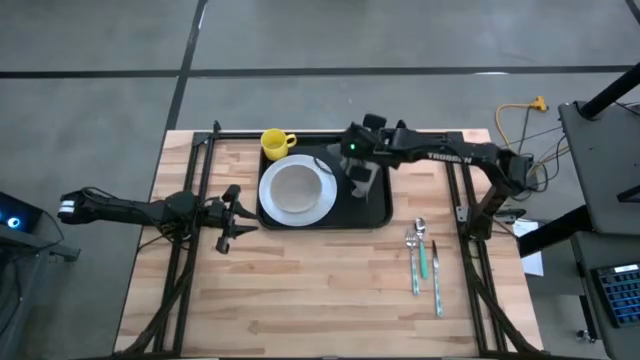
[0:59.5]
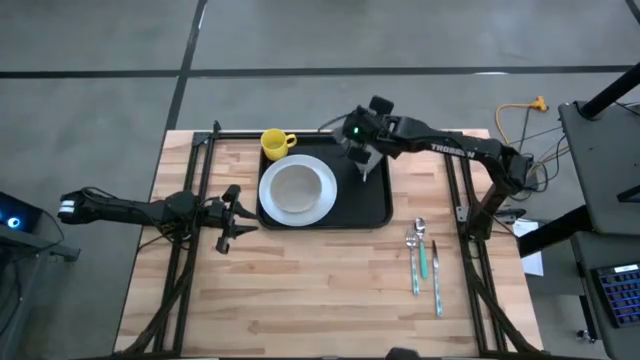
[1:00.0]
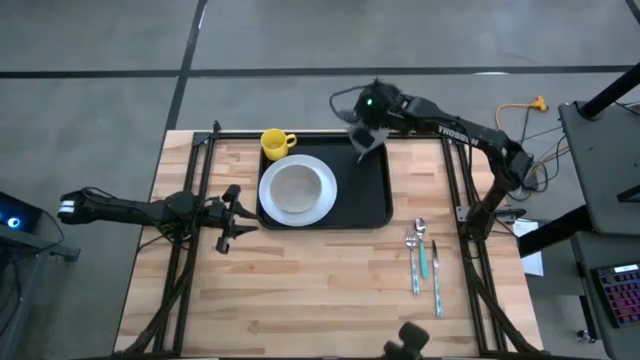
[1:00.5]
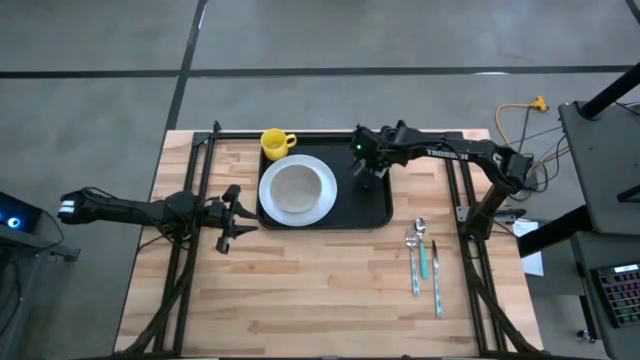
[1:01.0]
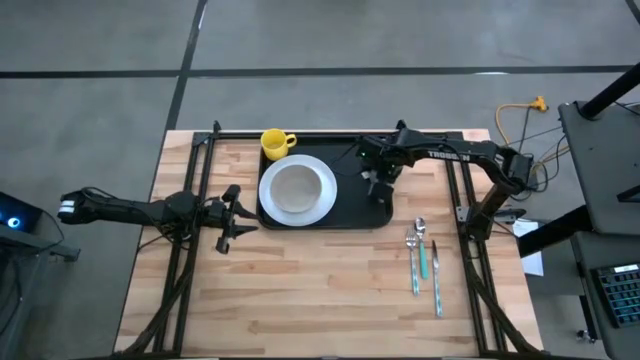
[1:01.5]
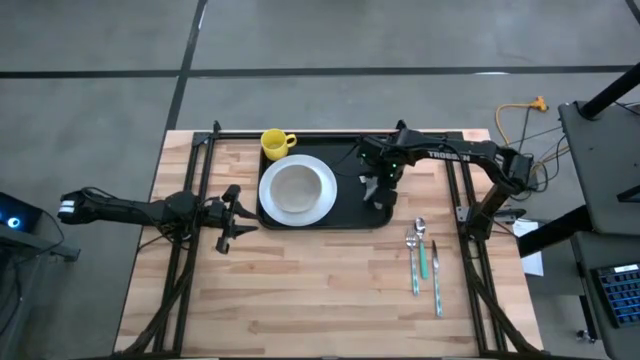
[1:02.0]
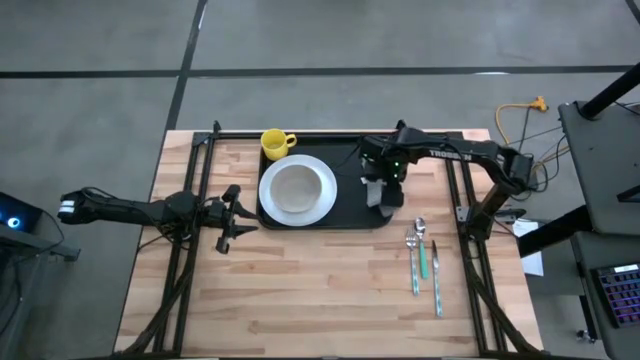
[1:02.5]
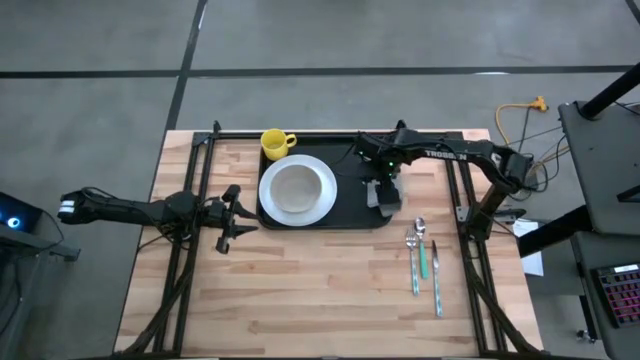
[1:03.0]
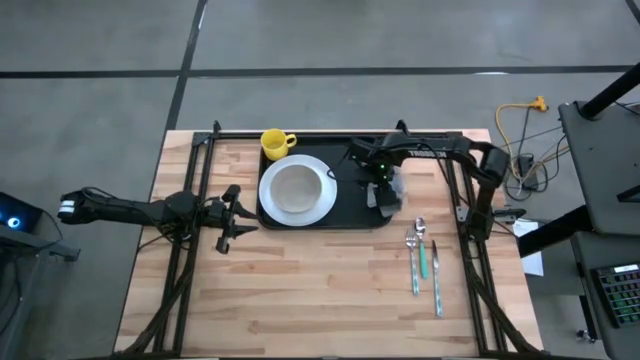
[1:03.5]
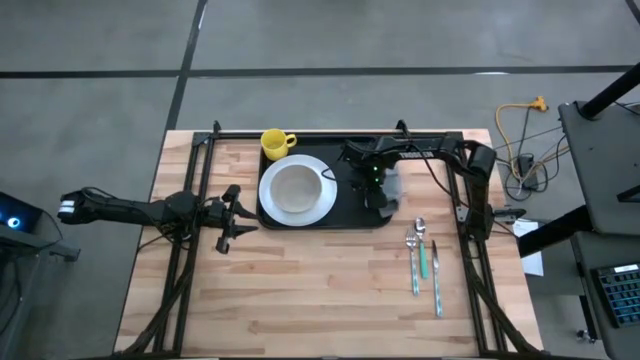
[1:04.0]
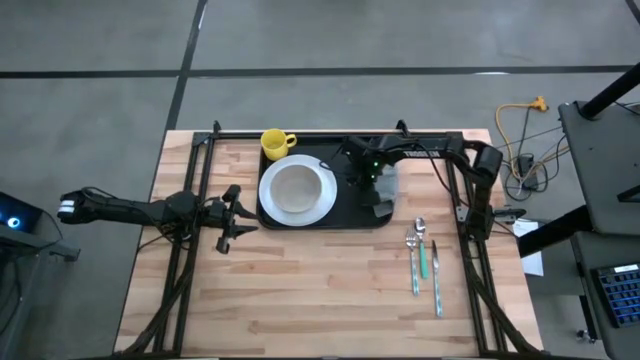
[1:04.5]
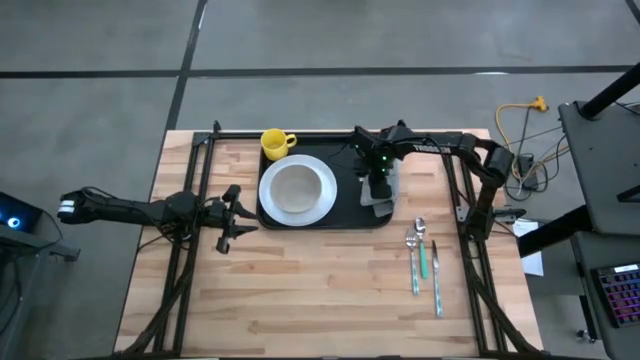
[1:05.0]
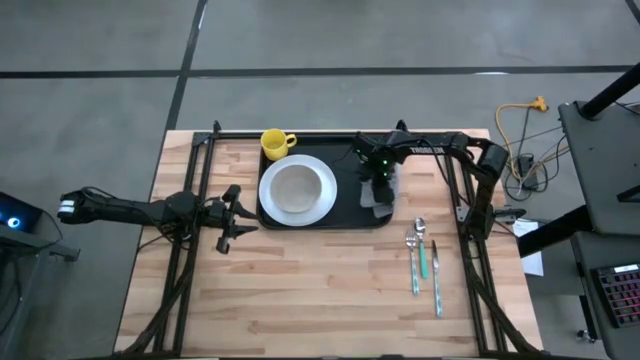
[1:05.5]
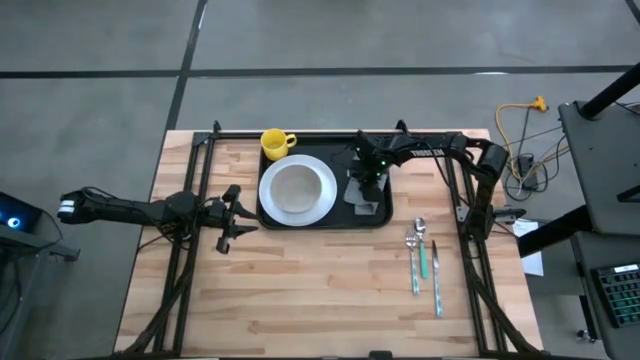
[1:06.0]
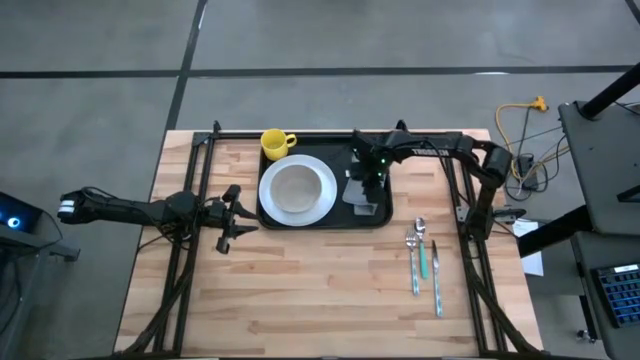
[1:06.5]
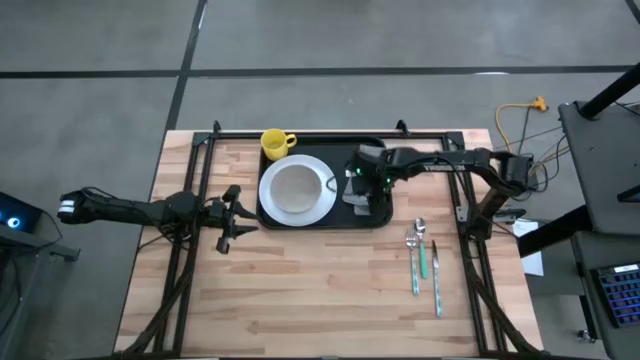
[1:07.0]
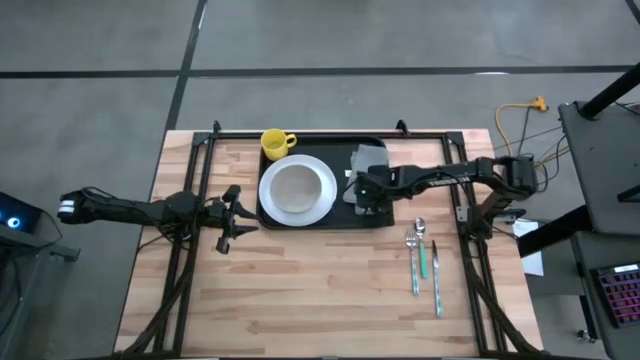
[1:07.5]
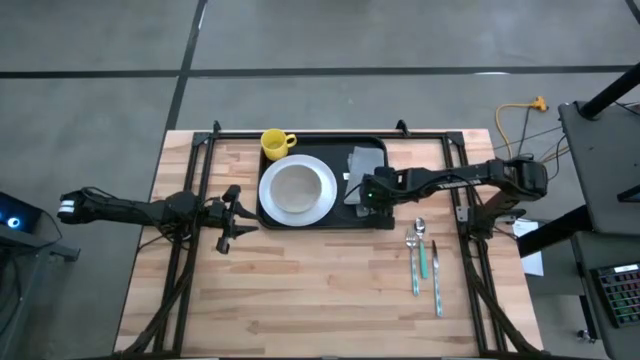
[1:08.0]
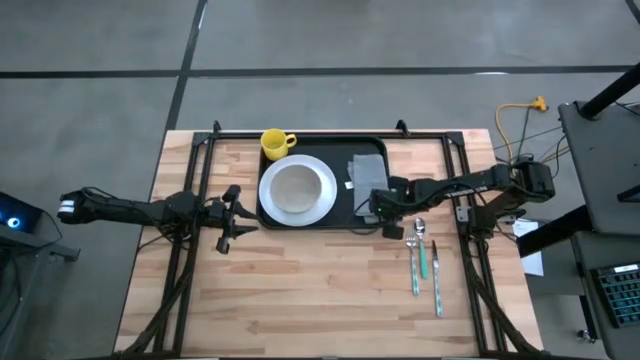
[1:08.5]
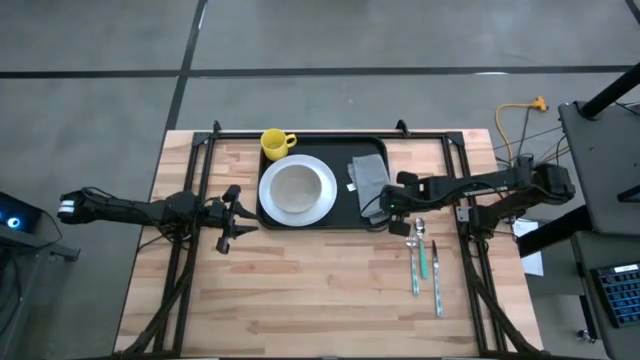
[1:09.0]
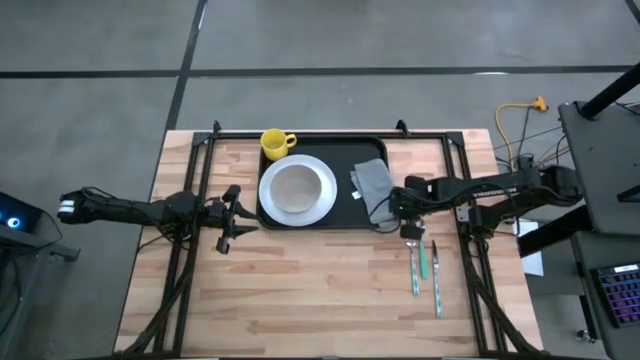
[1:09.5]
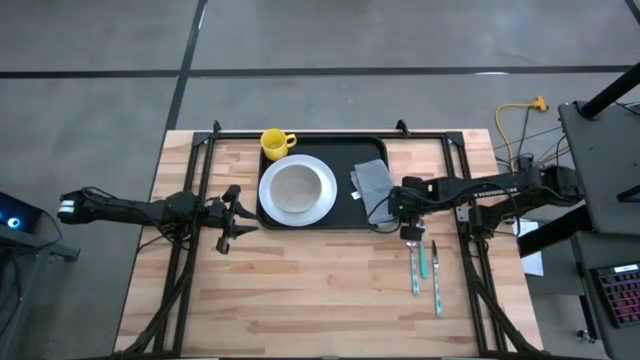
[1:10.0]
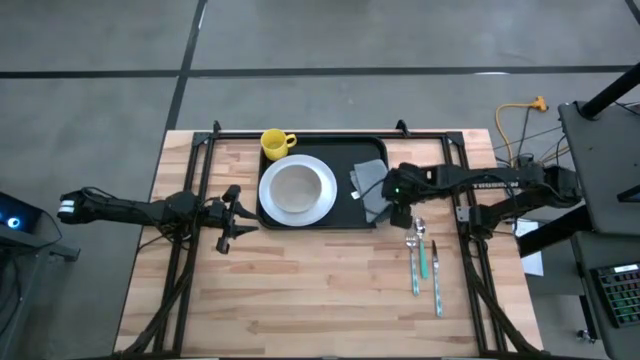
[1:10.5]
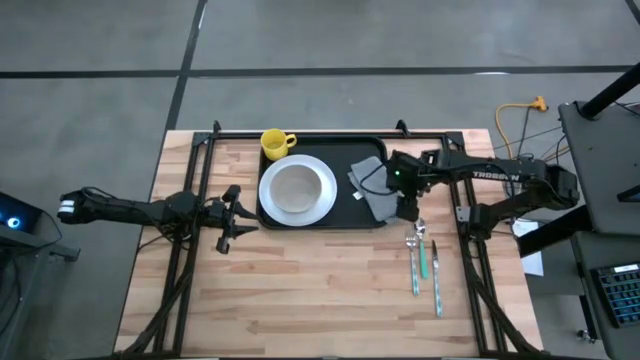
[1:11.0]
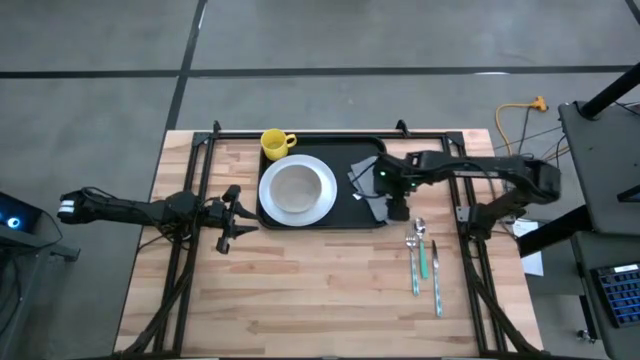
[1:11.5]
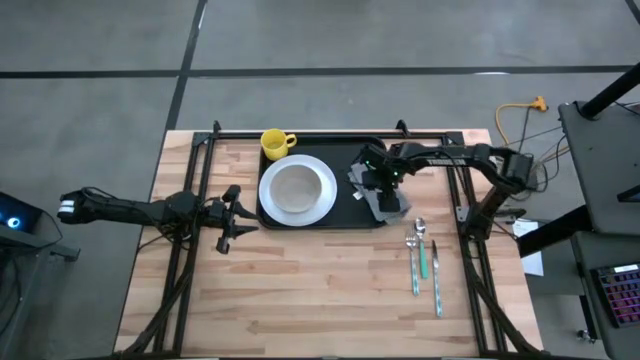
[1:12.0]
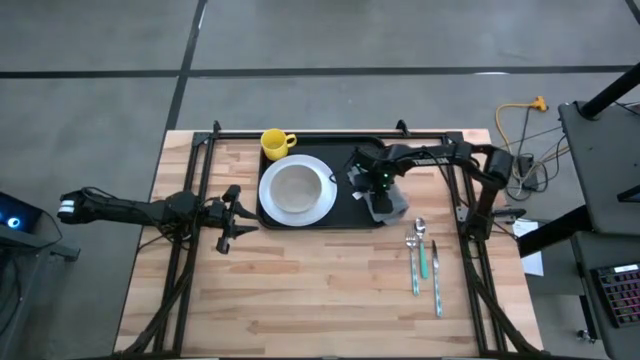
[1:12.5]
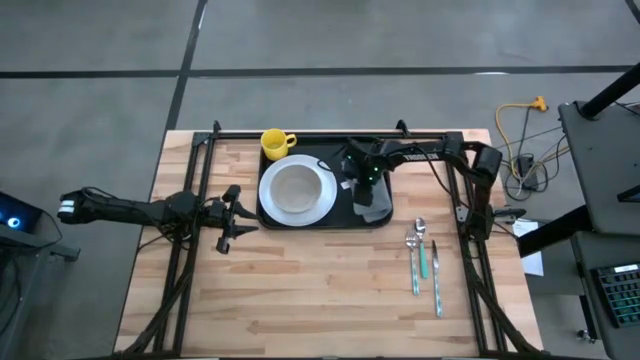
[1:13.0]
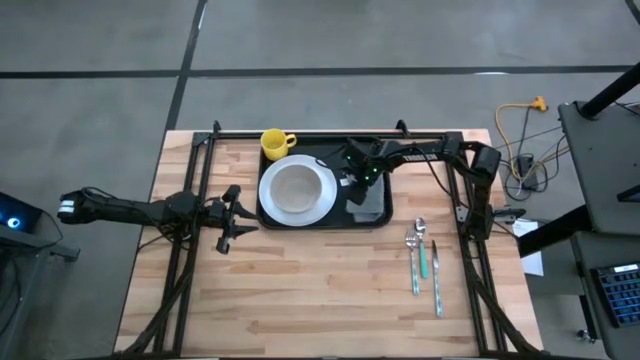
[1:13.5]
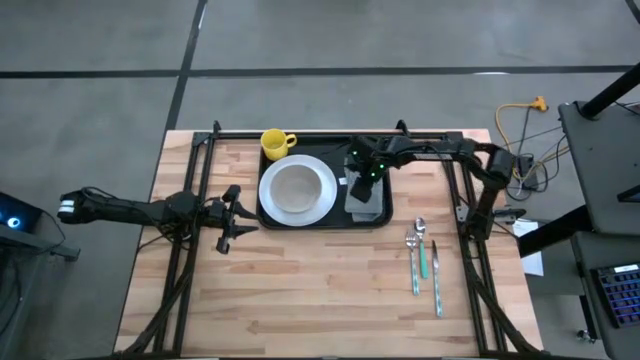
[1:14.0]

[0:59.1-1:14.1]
Task: Set up tray
Put the gray napkin on the right side of the white plate

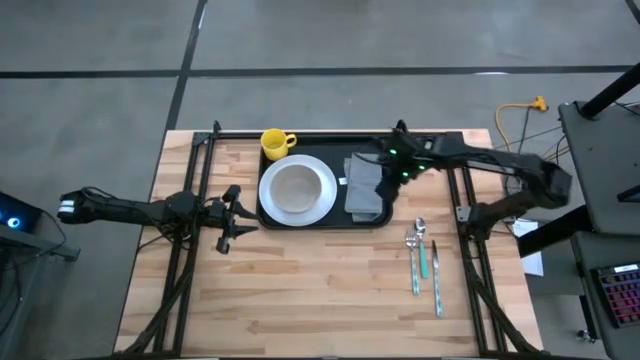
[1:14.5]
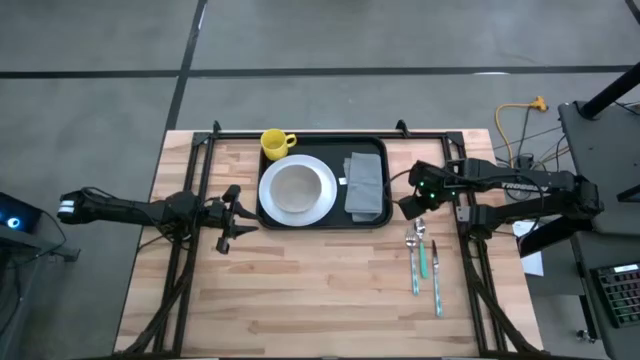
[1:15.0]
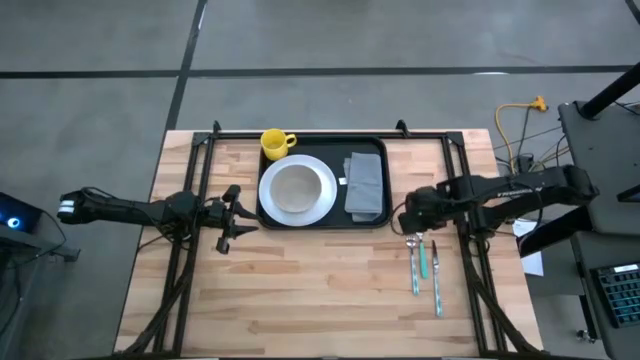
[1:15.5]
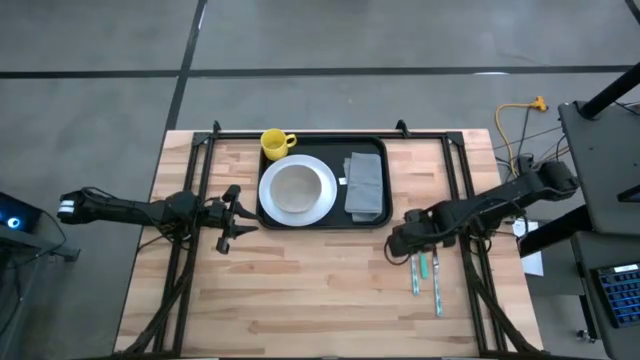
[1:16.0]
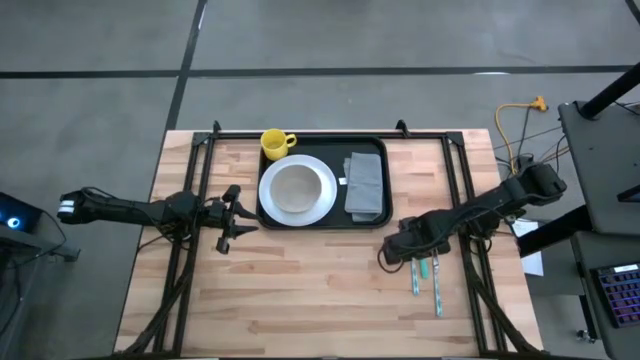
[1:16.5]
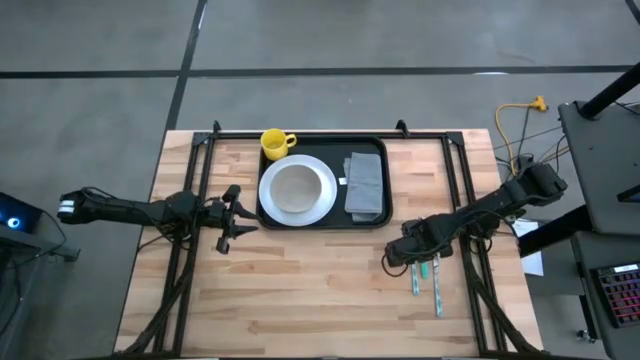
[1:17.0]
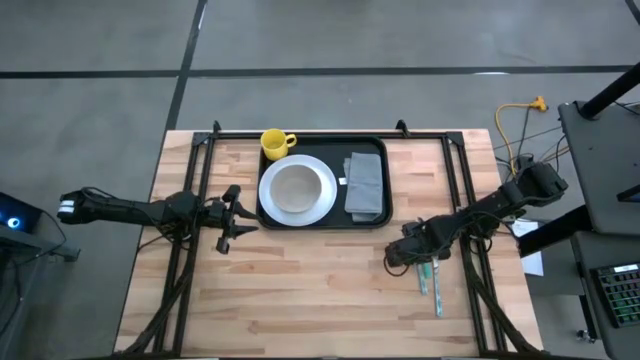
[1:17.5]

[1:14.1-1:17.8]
Put the blue fork on the gray napkin

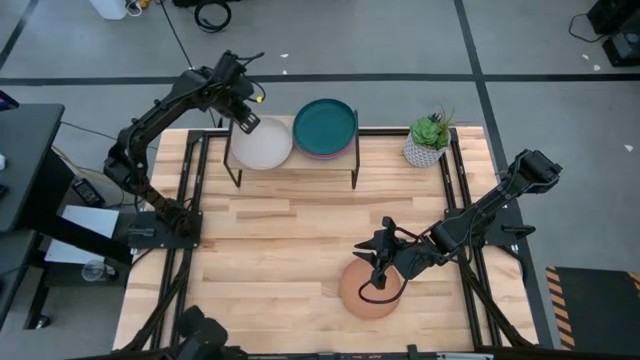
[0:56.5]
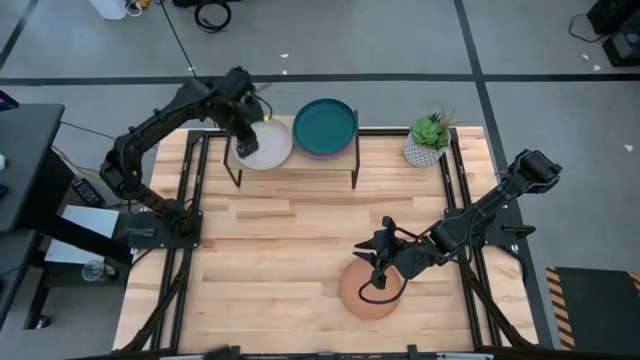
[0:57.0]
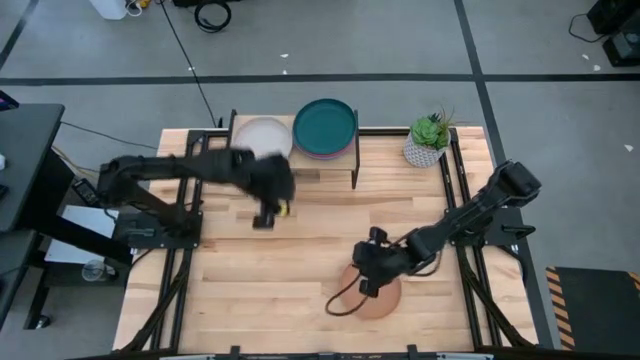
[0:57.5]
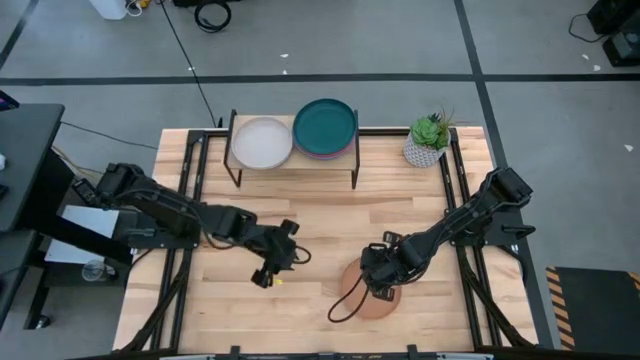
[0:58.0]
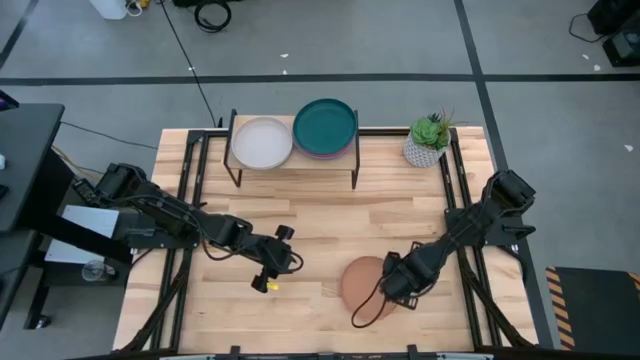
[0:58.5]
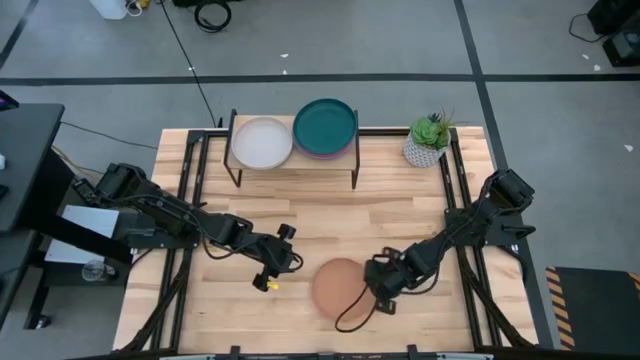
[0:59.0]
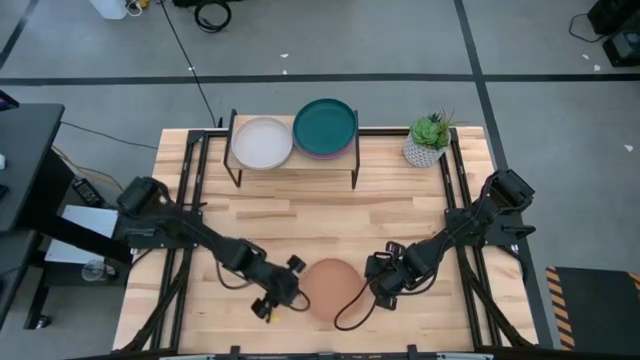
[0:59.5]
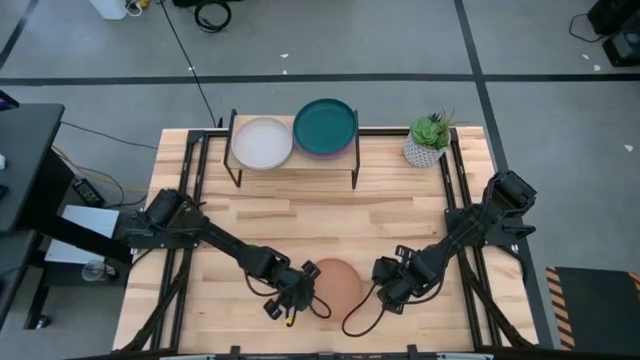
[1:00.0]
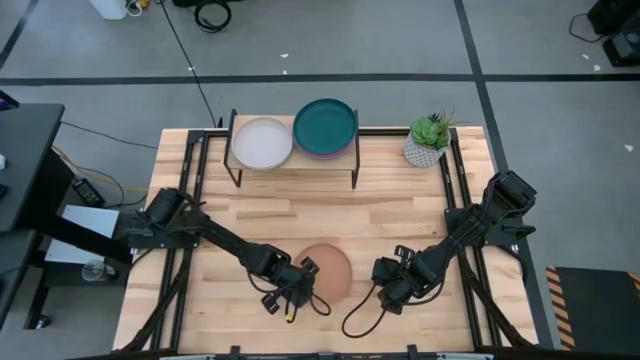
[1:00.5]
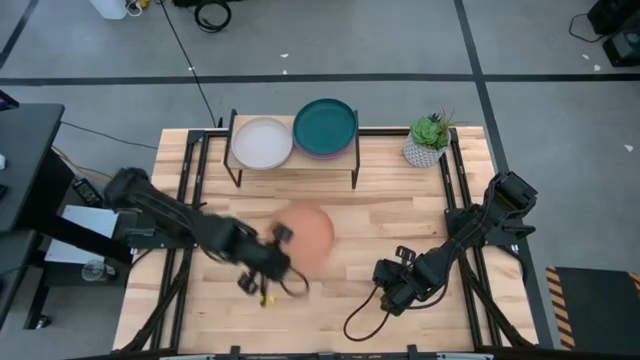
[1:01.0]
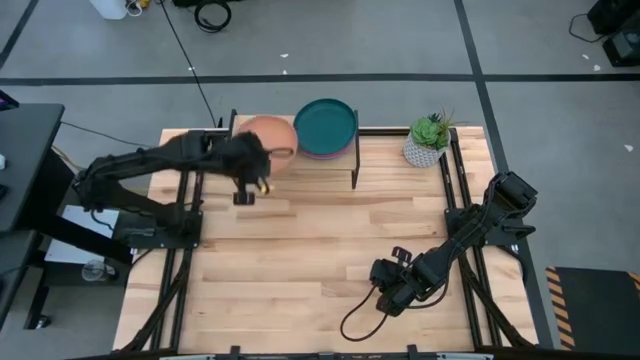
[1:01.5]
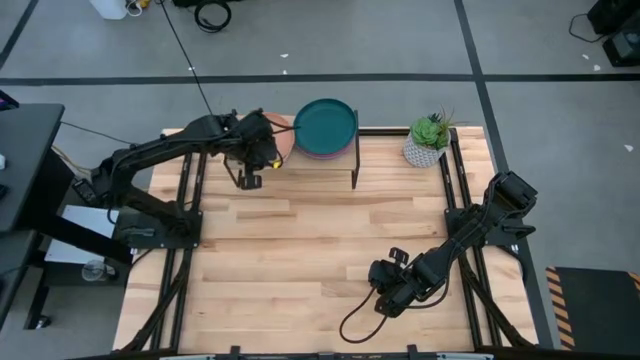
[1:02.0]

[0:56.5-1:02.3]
Task: Place and stack plates onto a shelf
Stack the brown plate on top of the gray plate on the shelf
